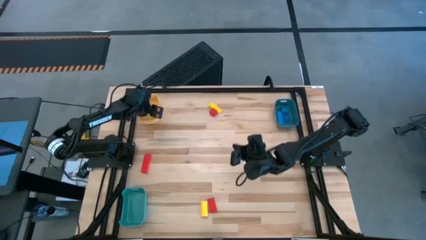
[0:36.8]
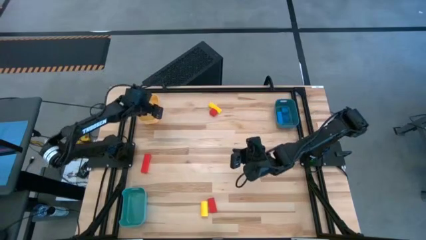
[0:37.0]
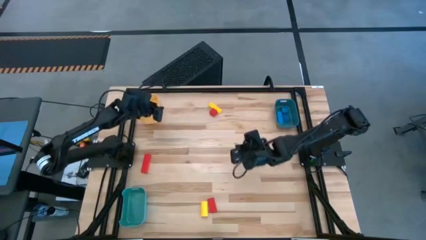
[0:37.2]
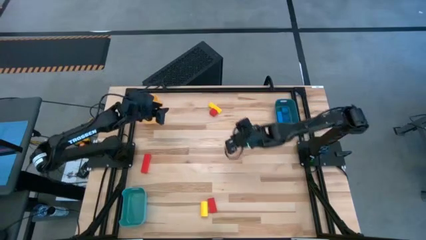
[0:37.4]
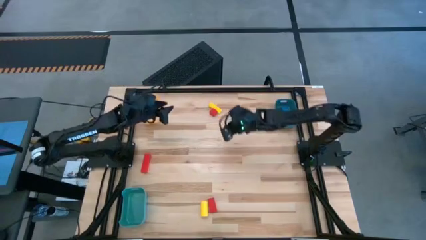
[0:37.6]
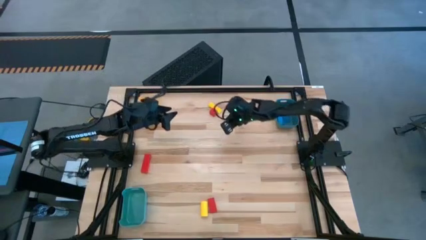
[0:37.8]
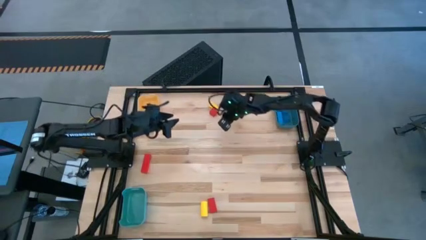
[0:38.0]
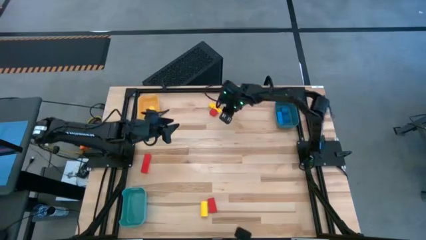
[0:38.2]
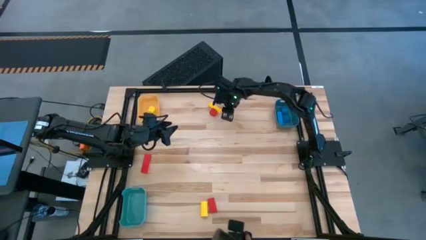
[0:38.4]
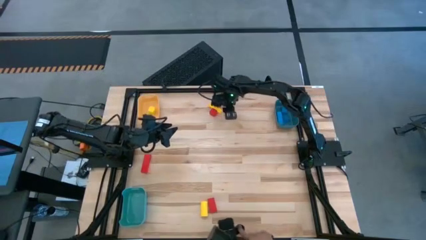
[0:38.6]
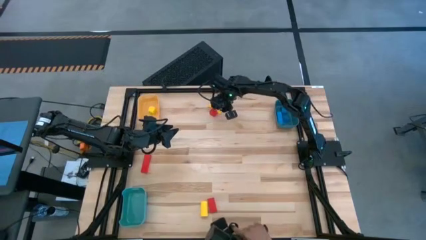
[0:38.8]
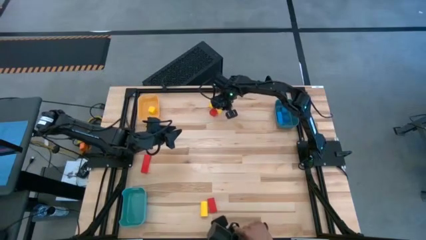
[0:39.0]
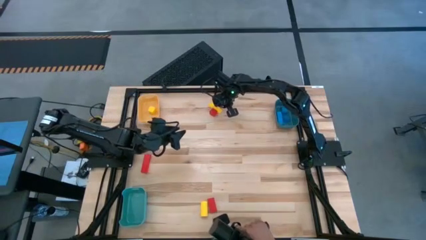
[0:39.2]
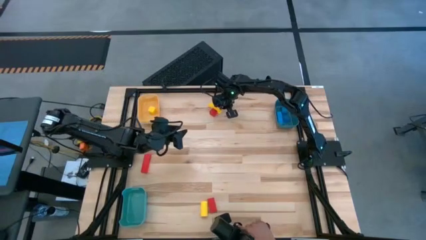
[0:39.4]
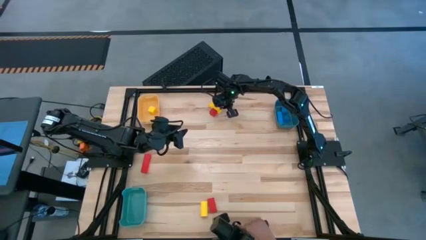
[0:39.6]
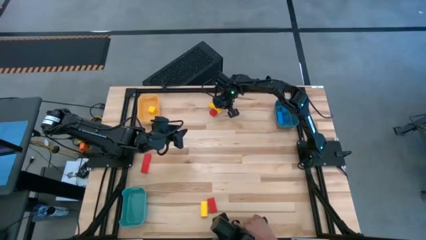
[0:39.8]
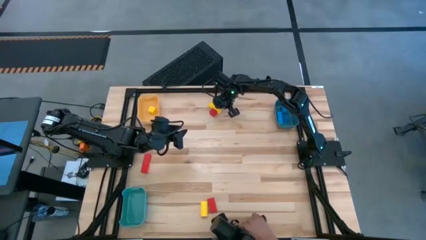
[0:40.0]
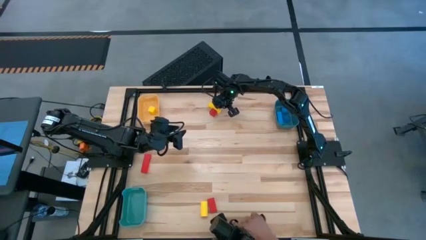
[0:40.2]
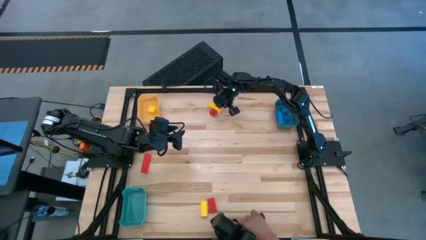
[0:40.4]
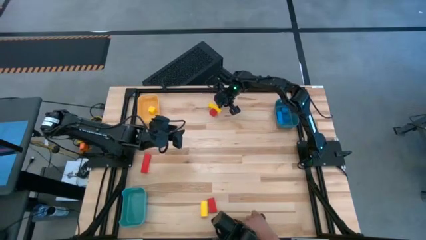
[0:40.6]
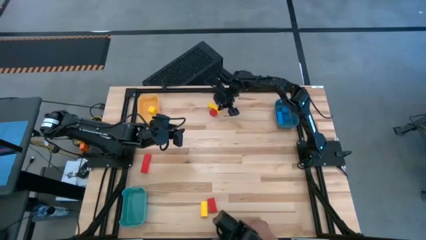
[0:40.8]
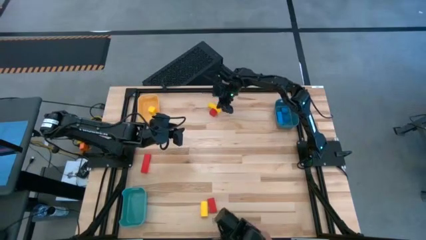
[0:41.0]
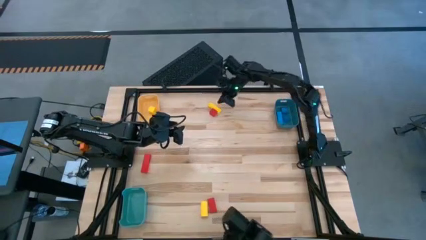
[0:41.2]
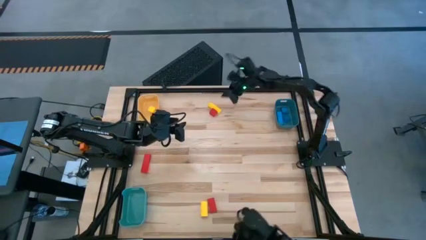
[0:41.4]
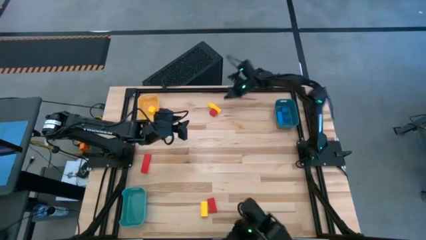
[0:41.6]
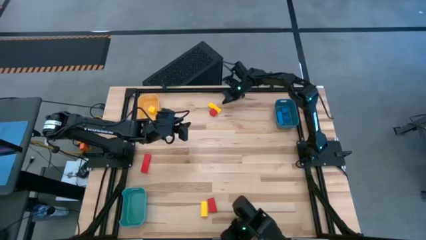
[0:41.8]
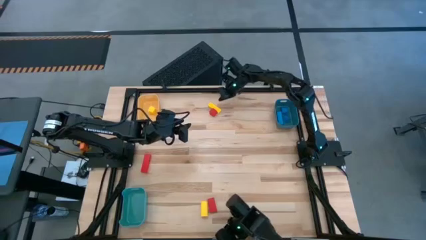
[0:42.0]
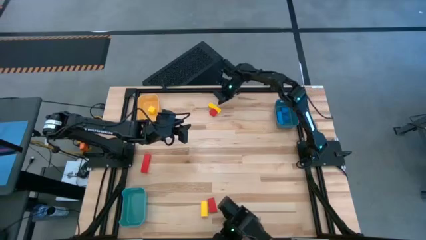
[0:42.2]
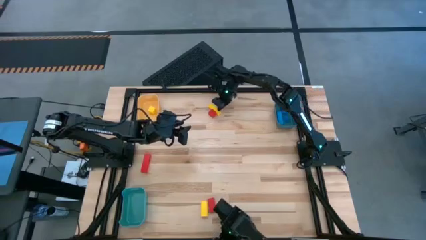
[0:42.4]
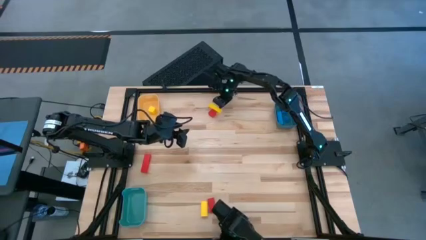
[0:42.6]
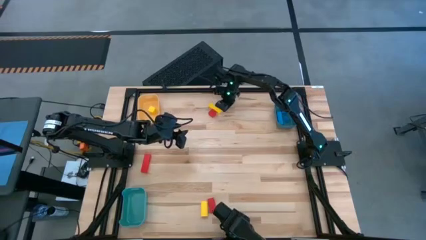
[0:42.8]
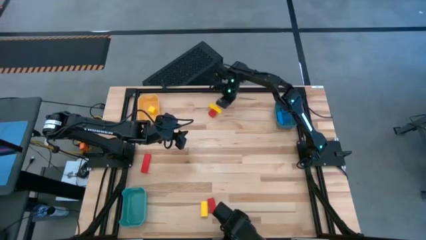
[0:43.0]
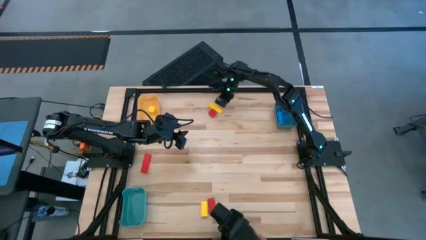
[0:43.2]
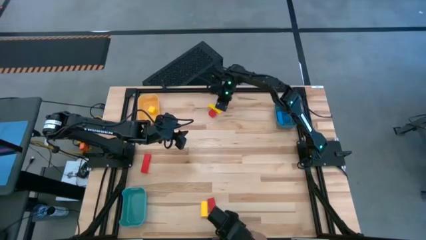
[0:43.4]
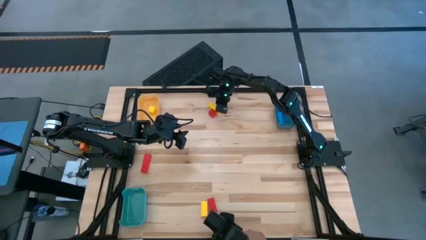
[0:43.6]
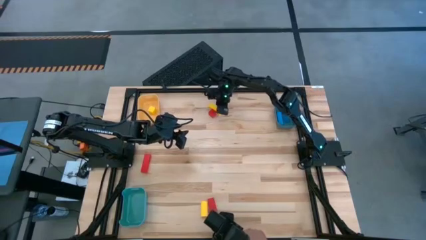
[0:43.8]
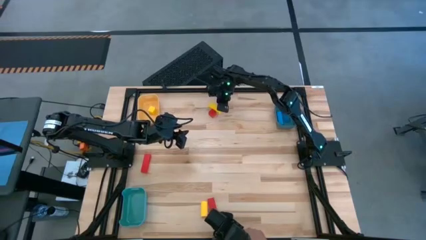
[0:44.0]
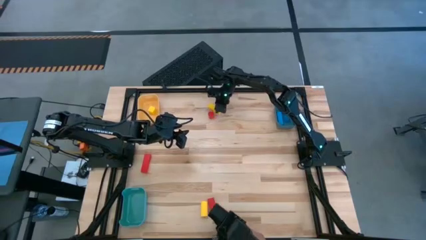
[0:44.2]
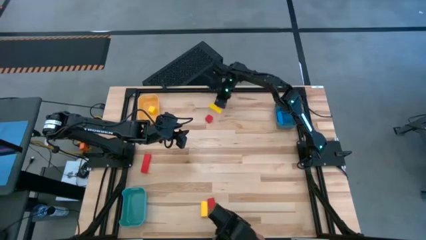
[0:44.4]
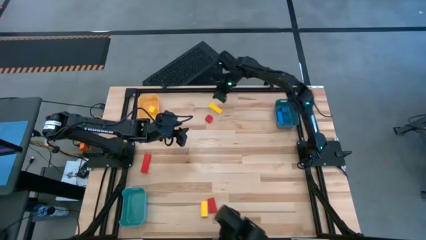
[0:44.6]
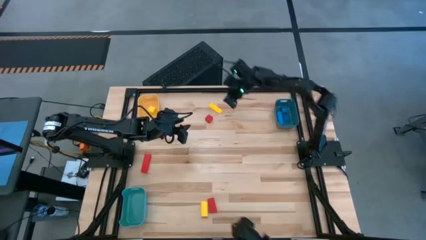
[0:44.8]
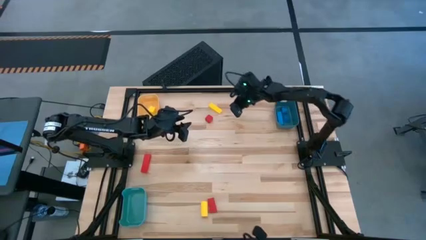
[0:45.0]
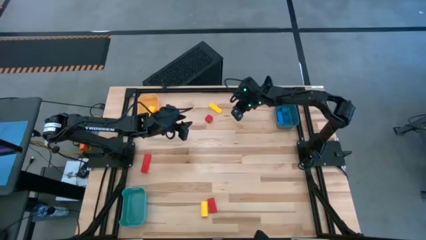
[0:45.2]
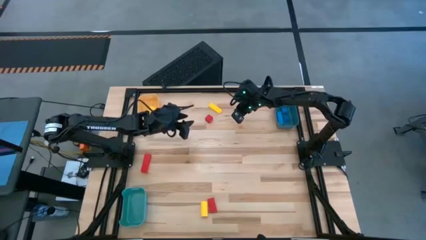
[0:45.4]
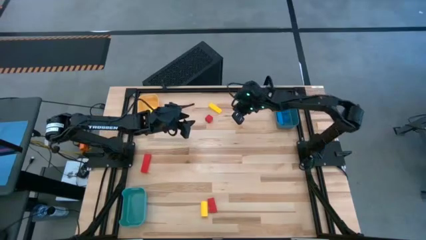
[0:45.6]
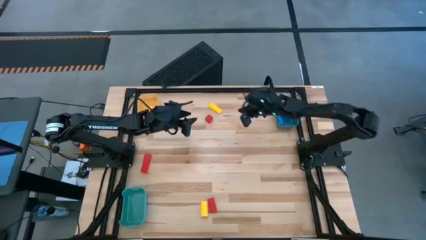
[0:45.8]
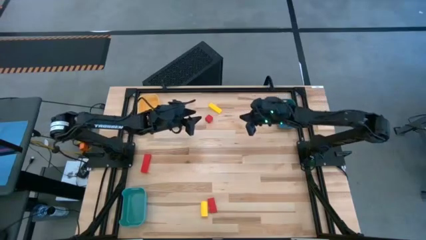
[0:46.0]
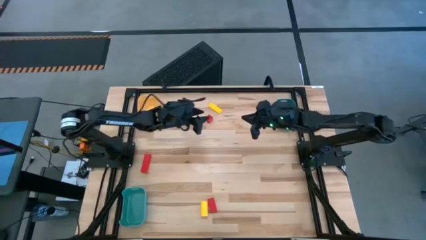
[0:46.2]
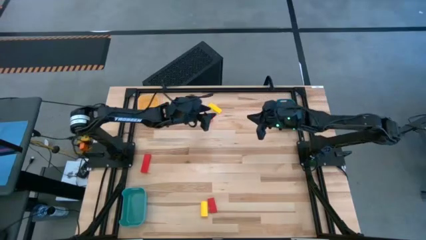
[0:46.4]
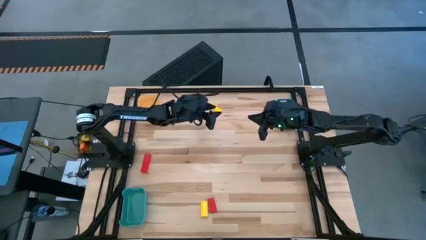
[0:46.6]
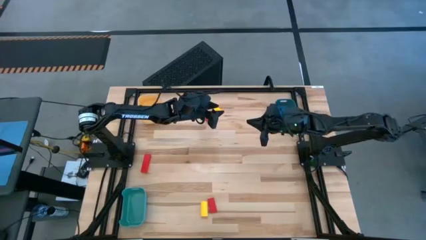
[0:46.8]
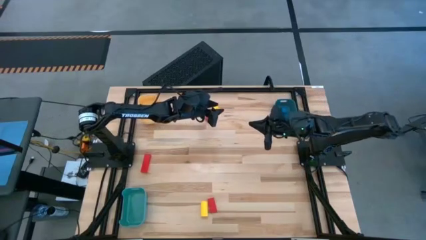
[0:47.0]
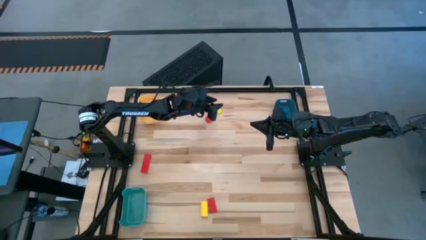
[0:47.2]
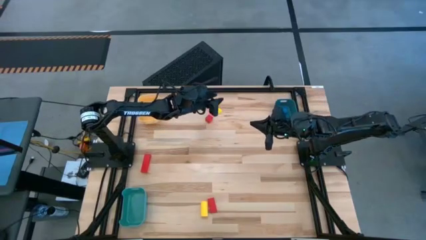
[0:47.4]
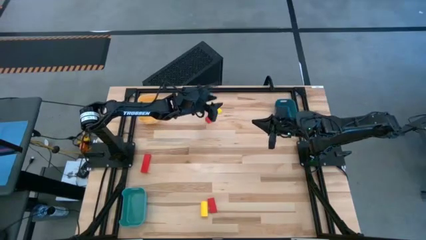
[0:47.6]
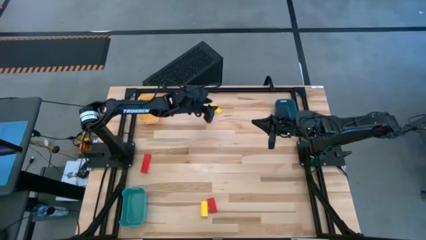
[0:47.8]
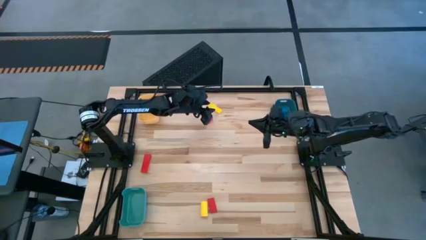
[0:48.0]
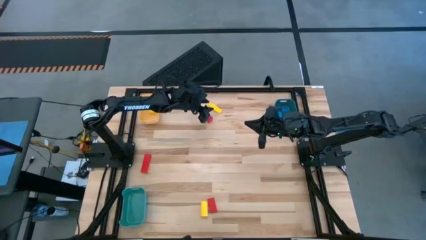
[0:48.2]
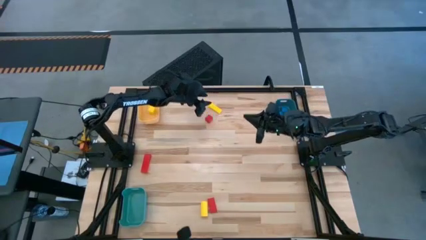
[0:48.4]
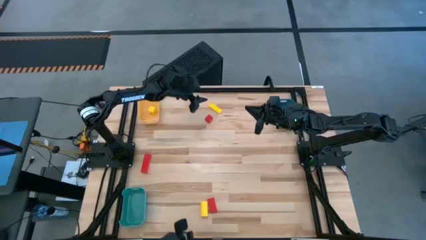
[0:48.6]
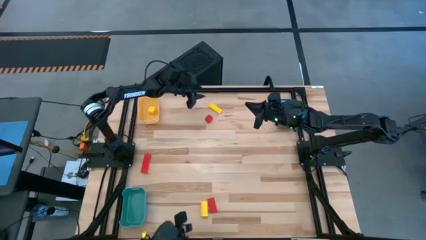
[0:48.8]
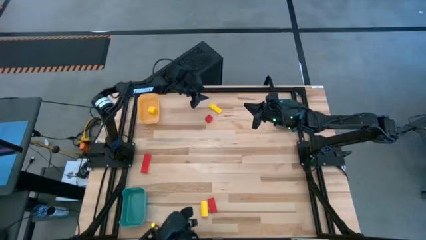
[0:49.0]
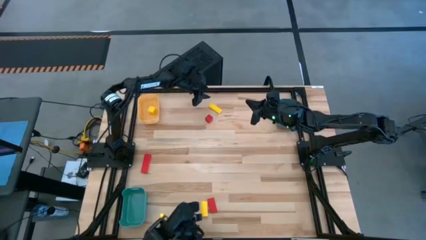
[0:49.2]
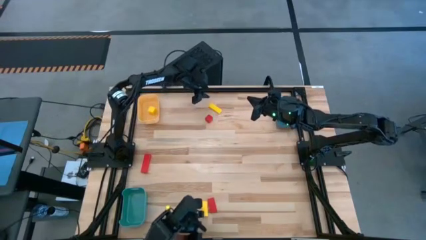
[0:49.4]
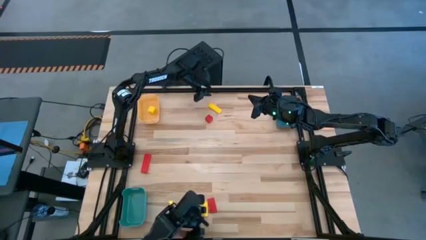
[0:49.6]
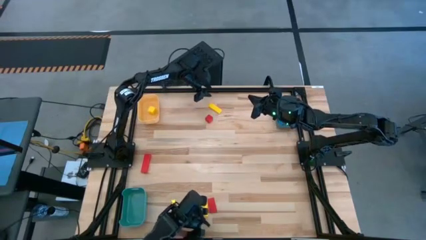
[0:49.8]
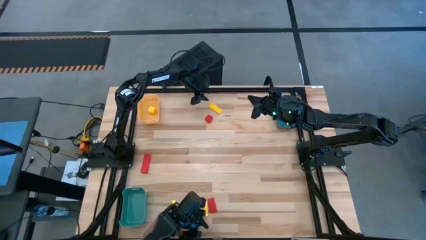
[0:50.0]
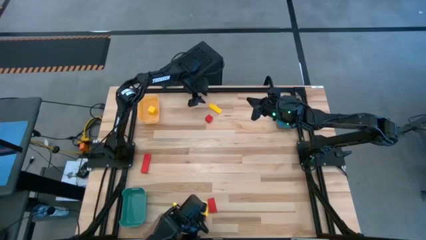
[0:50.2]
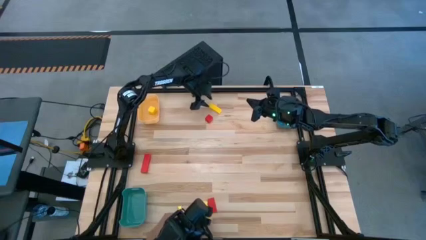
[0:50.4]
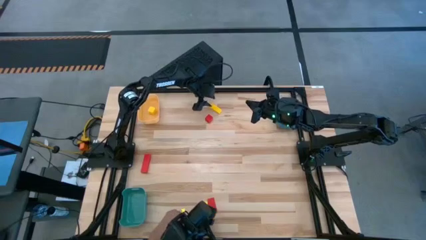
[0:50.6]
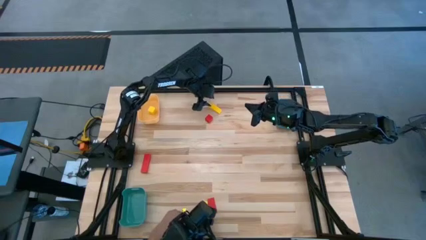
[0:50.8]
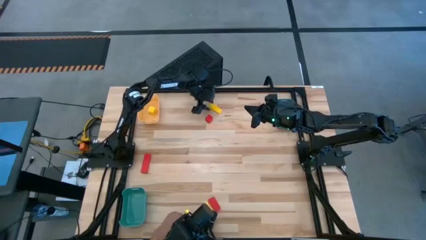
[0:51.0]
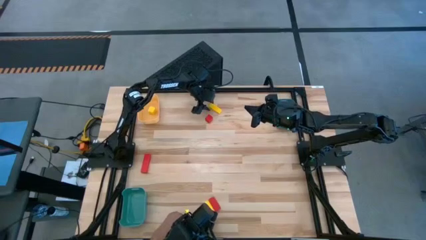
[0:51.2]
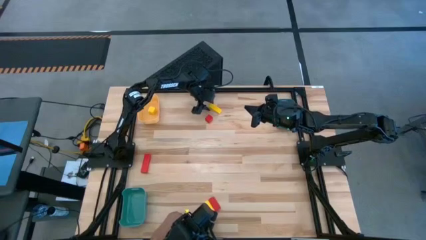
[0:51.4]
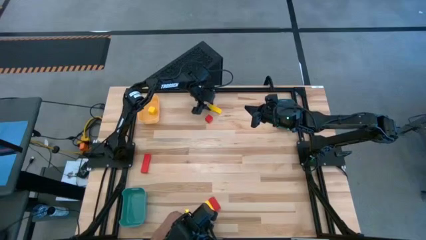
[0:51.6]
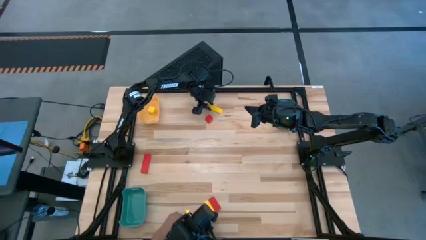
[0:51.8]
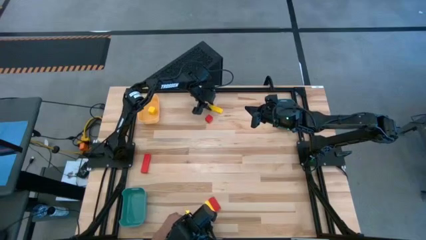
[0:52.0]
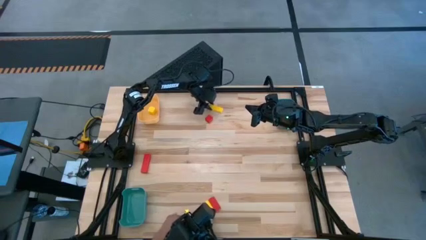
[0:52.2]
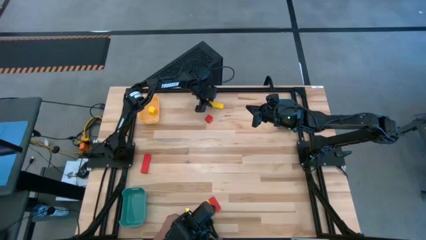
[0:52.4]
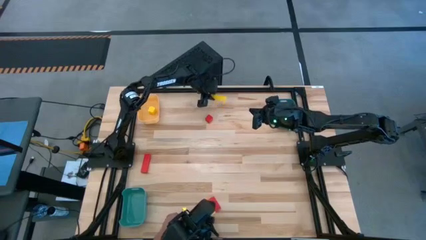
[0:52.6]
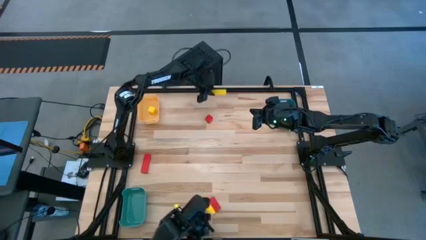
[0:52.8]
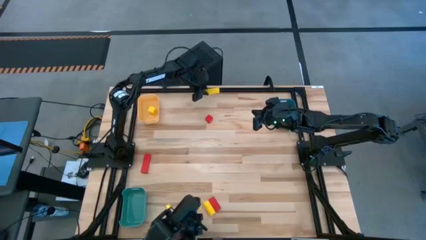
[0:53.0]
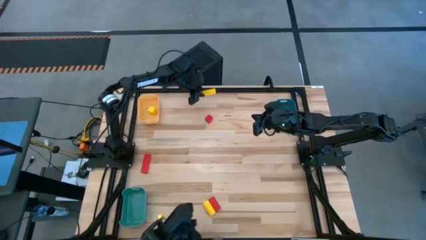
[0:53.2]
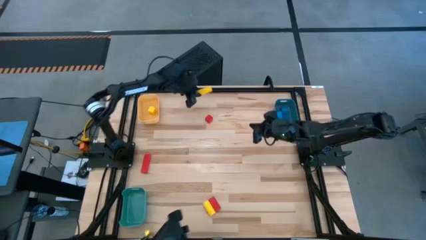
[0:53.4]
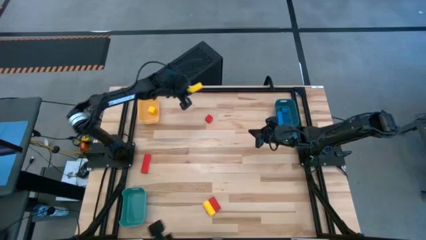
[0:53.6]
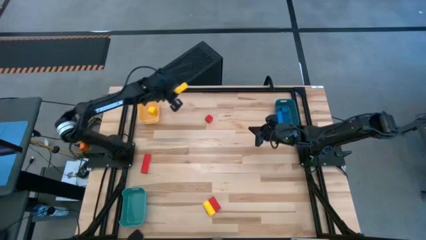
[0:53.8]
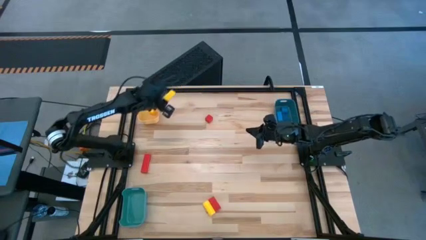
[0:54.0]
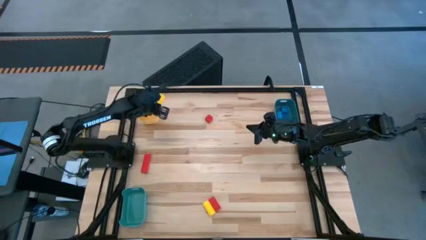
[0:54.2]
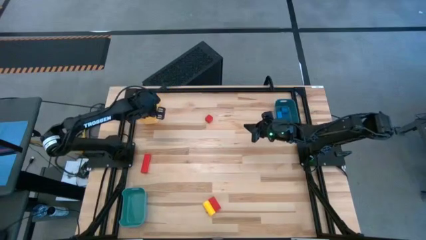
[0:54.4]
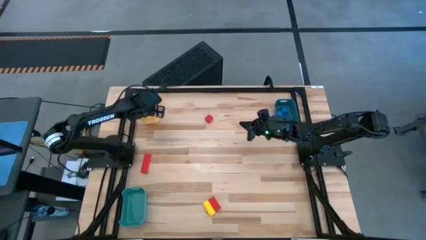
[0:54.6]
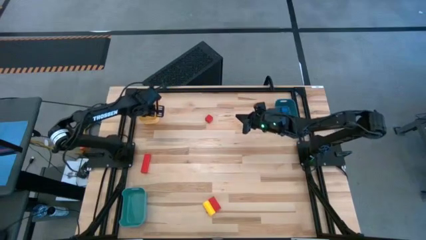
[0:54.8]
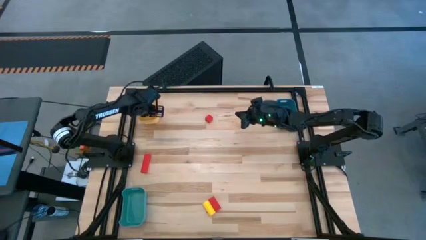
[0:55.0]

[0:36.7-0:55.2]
Task: Sort & place blocks by color
Put the top yellow block into the yellow bin
